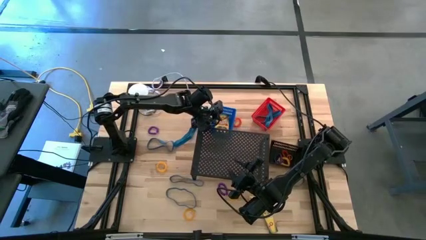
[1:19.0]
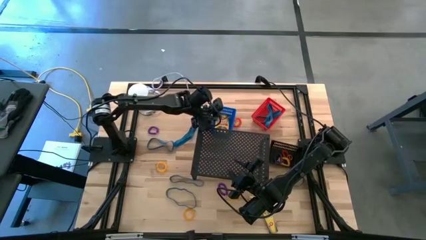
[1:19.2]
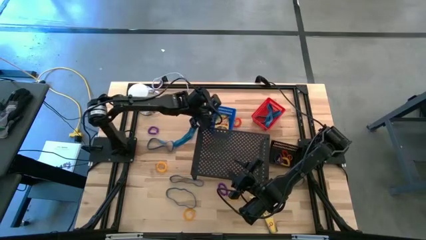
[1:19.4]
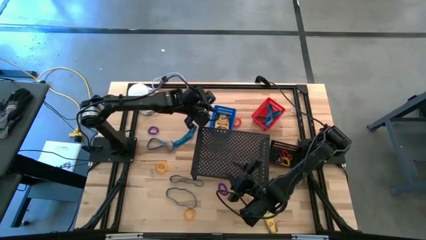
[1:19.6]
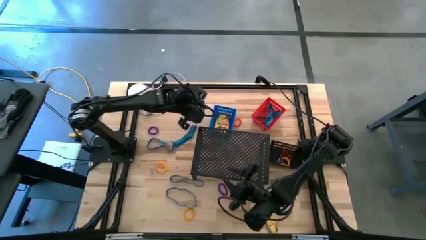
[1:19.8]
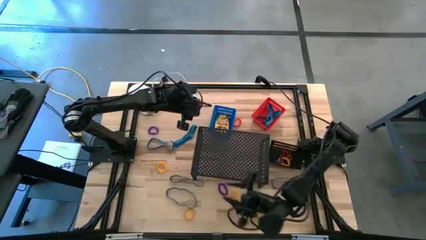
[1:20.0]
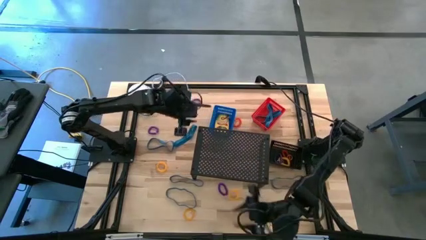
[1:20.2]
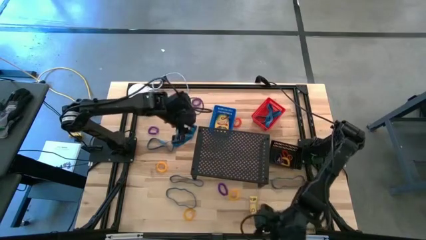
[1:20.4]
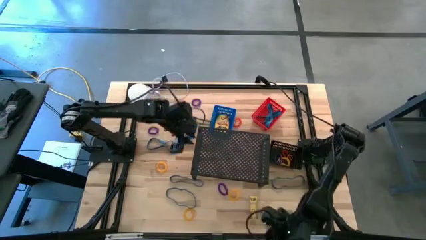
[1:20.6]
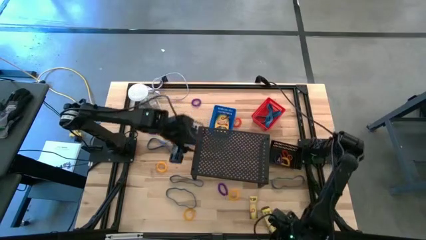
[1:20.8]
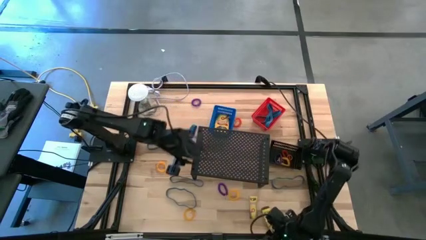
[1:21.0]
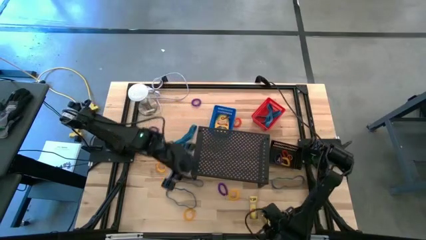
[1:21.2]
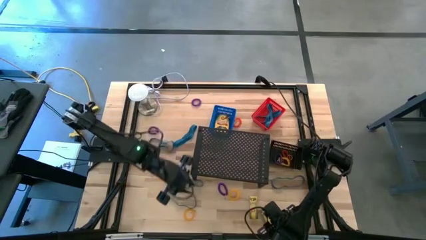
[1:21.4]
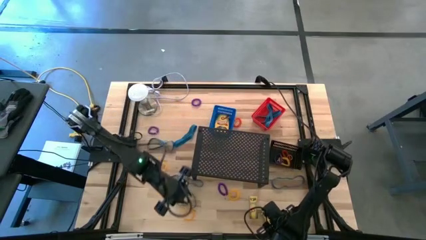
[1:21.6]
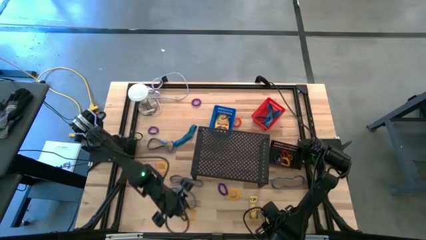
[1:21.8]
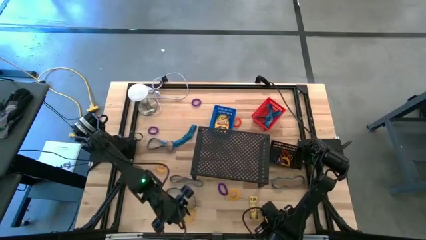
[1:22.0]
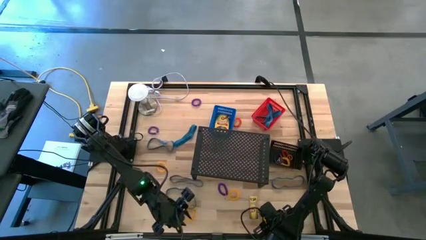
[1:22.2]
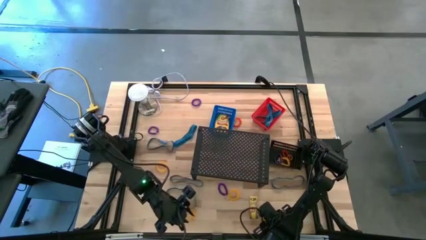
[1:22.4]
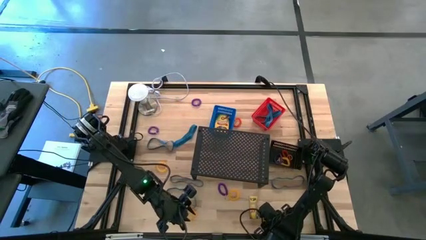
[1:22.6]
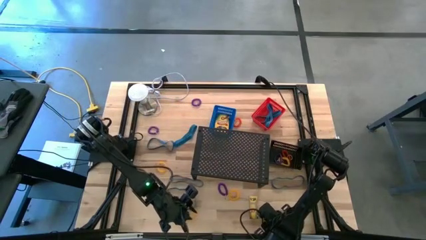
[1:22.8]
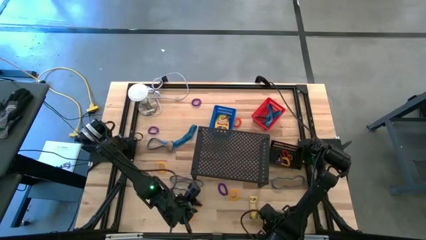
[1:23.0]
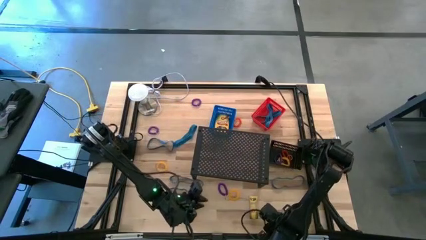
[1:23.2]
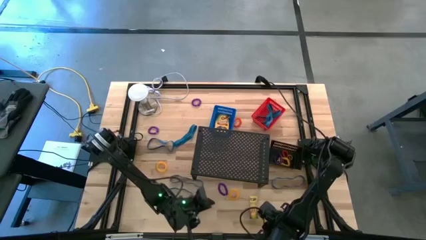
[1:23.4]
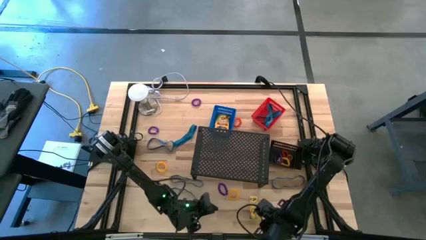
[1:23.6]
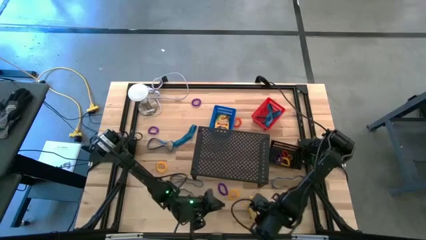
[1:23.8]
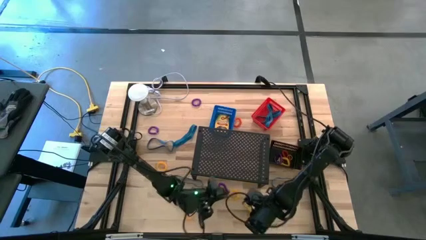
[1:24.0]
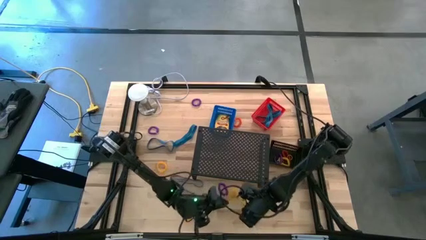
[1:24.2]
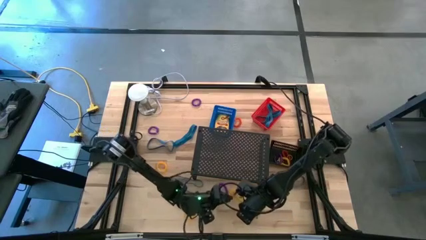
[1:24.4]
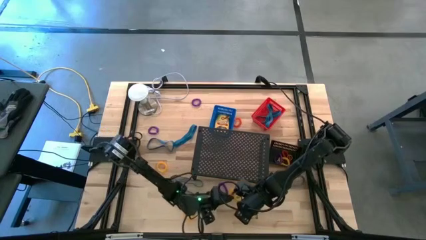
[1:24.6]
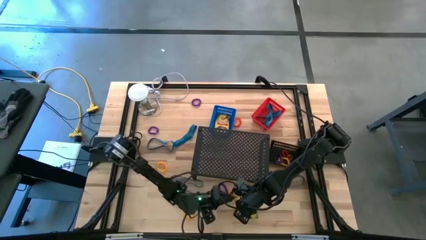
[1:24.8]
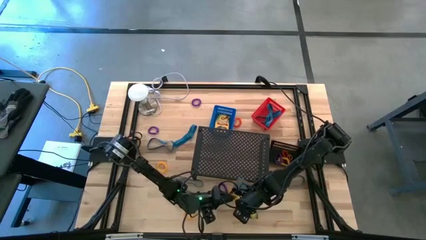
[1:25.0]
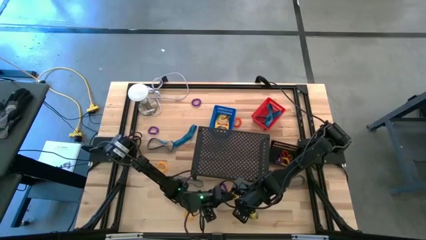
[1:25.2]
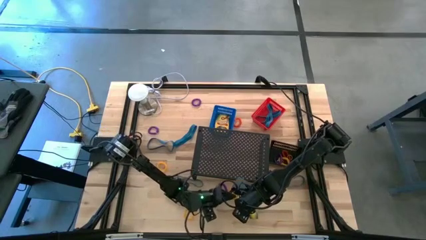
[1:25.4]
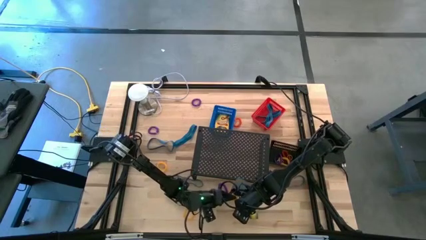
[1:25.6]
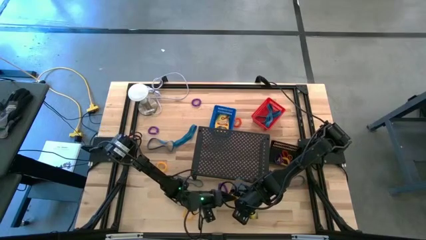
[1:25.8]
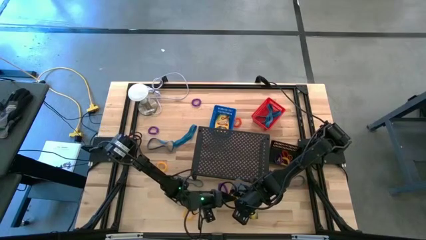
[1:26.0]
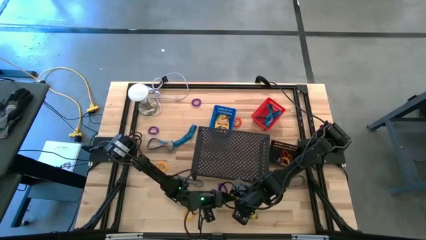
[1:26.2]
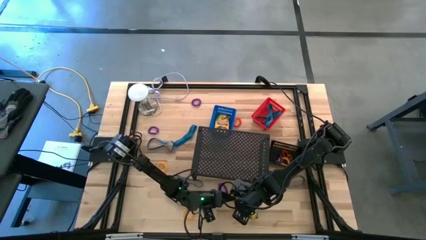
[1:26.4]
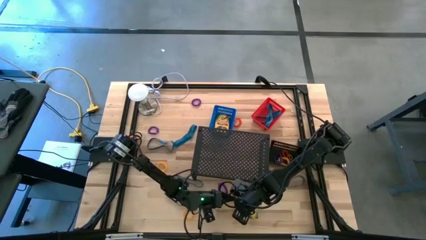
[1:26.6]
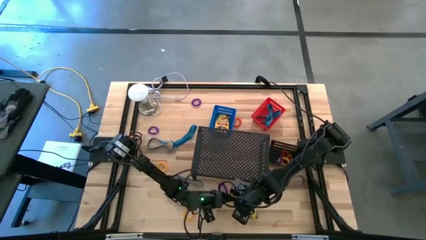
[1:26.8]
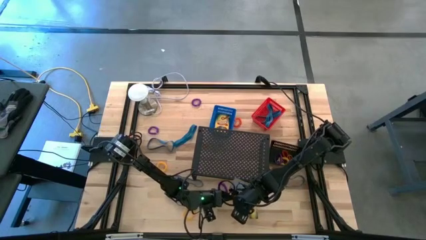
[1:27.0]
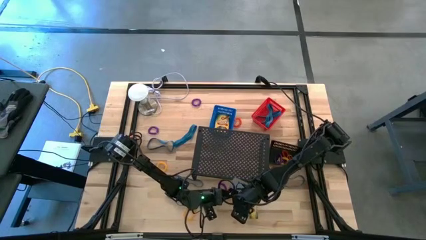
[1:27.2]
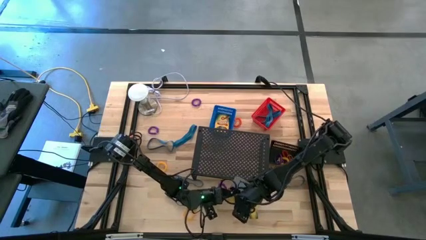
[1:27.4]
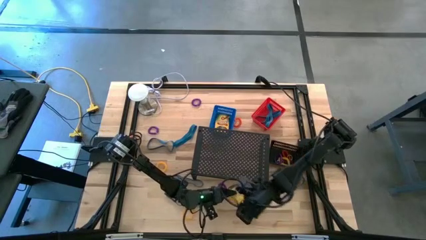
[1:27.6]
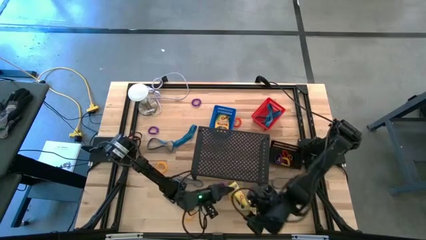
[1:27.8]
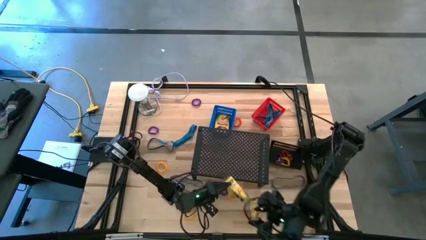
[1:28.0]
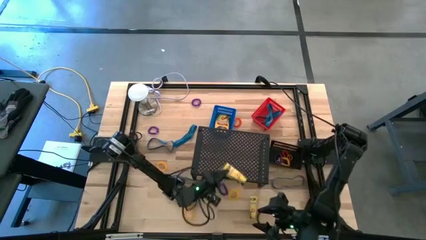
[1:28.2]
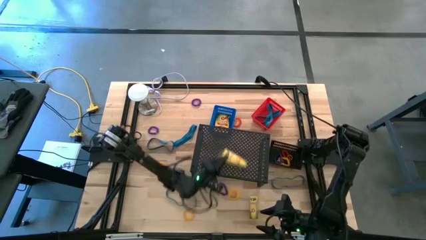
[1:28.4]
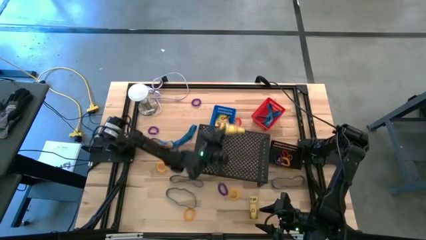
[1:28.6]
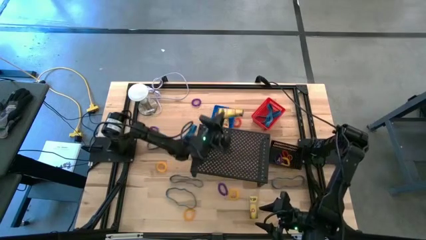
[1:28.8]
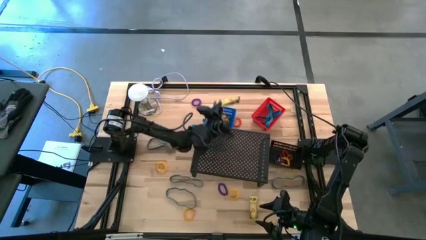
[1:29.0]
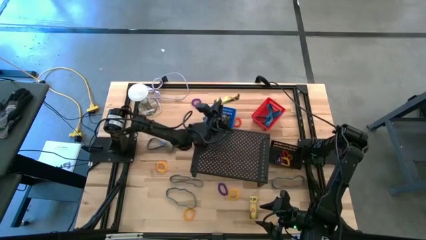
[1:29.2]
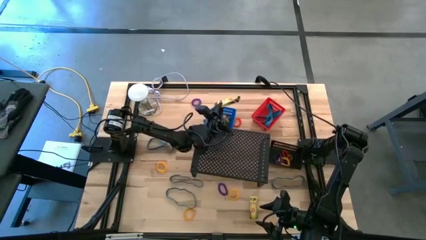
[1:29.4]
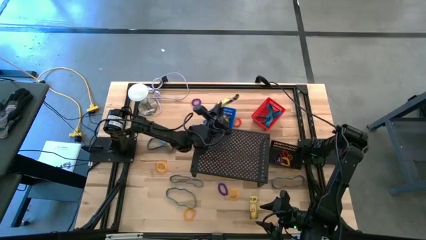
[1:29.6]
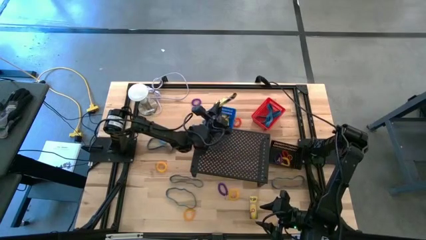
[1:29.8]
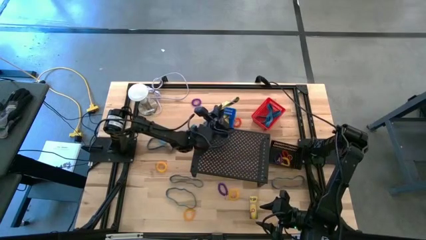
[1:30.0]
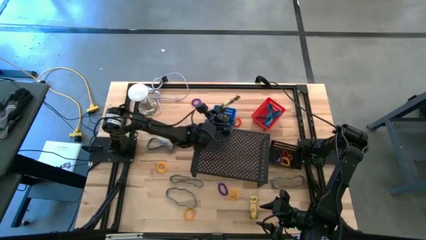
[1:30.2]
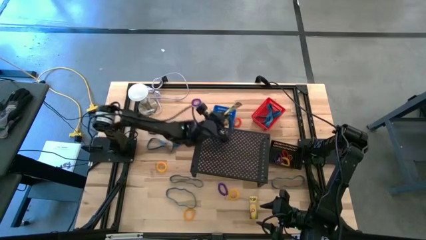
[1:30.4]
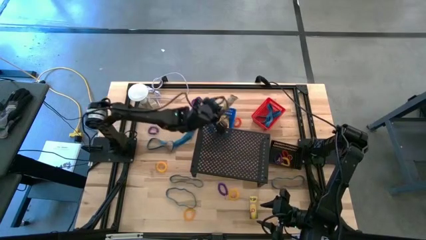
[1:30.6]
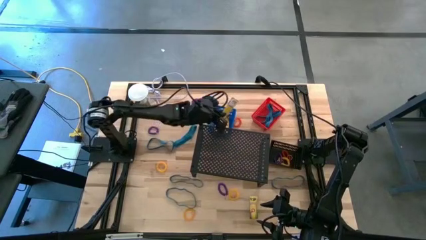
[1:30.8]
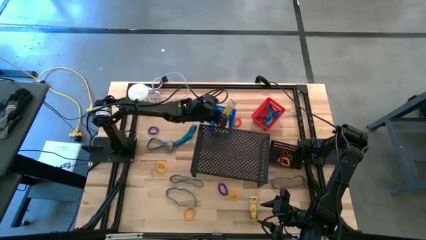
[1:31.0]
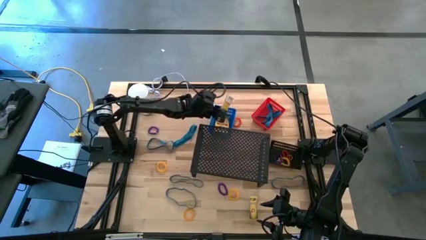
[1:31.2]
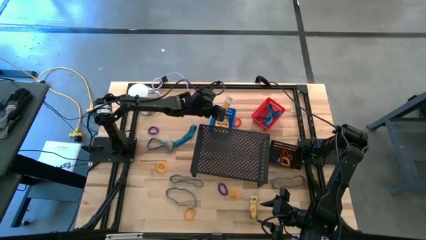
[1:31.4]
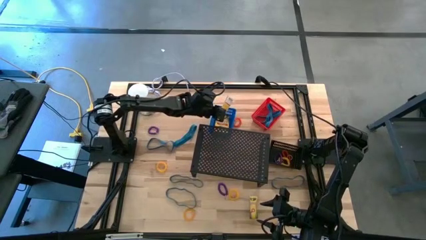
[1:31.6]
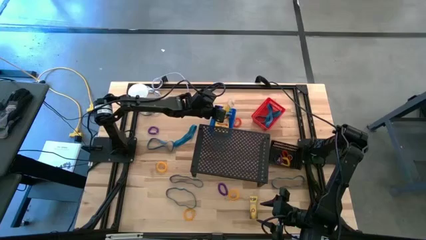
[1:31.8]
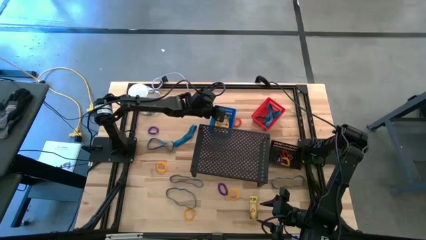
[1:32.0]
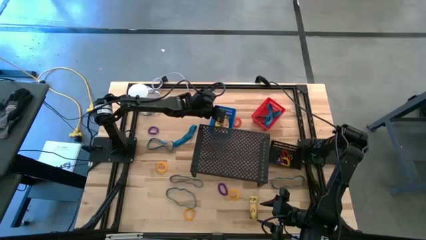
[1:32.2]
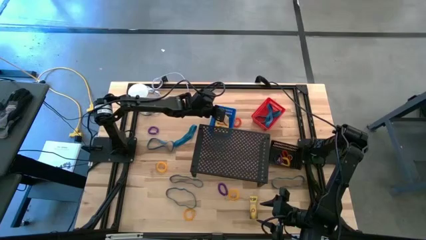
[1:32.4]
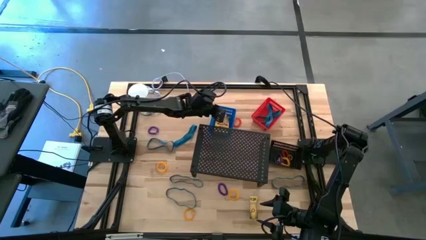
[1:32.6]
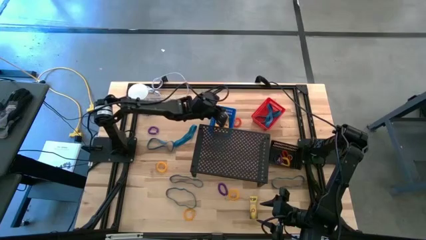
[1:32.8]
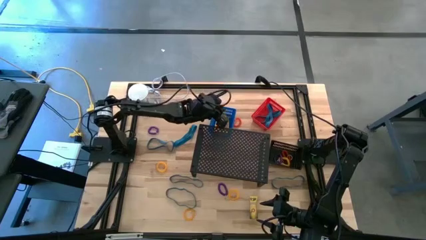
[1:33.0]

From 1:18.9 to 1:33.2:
Task: Pick & Place Office Desk Supplies
Put the yellow crayon box into the blue bin

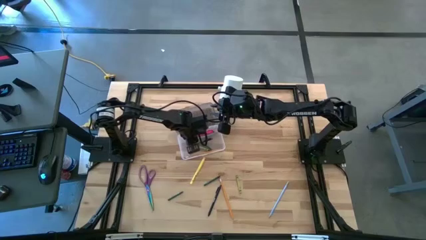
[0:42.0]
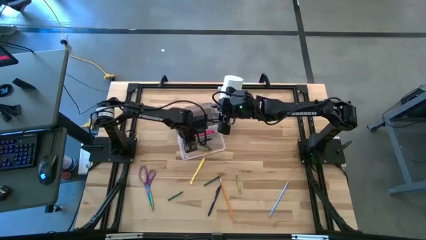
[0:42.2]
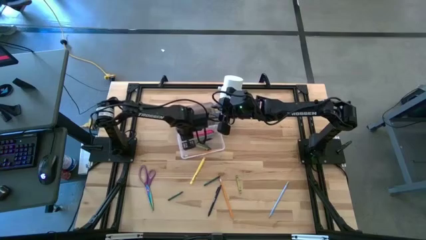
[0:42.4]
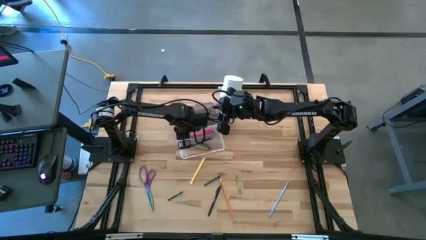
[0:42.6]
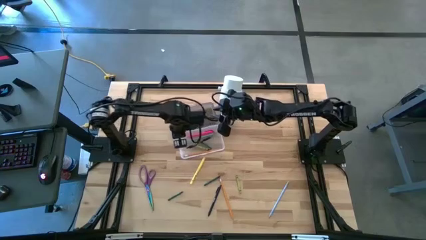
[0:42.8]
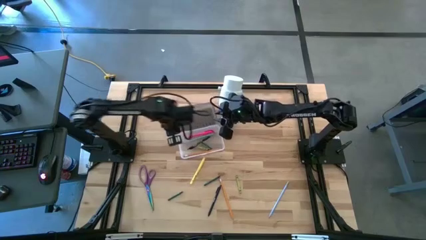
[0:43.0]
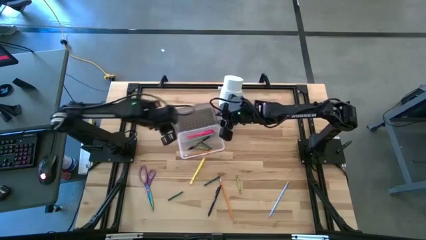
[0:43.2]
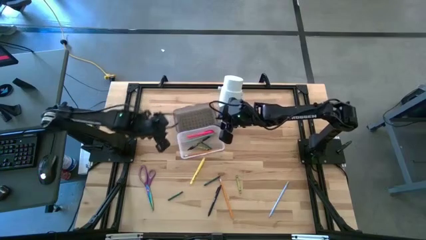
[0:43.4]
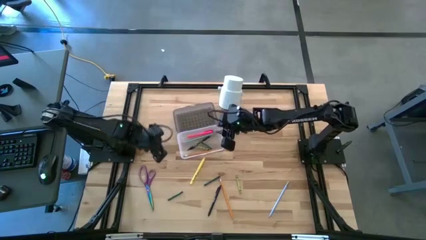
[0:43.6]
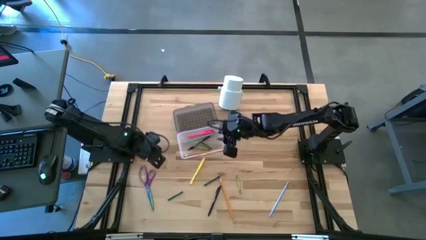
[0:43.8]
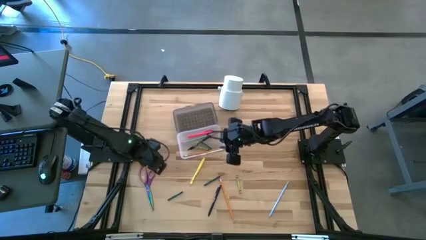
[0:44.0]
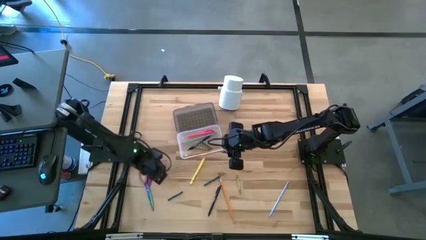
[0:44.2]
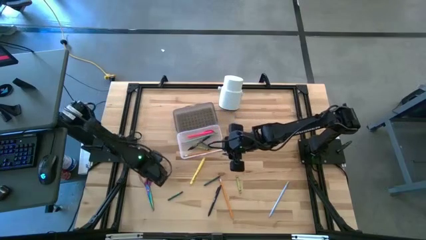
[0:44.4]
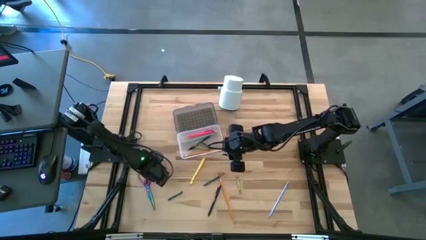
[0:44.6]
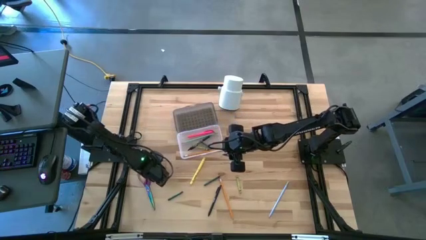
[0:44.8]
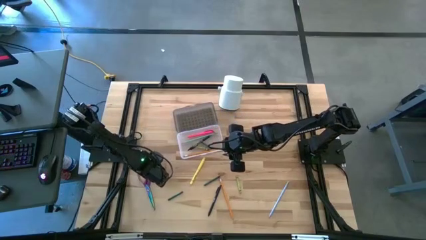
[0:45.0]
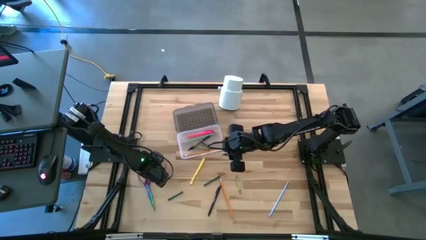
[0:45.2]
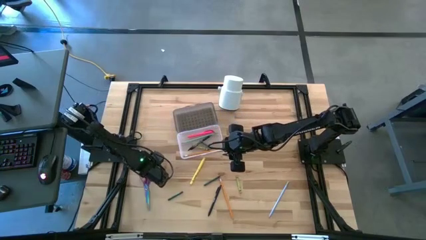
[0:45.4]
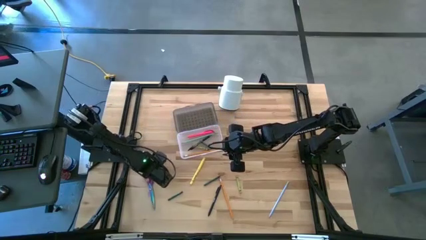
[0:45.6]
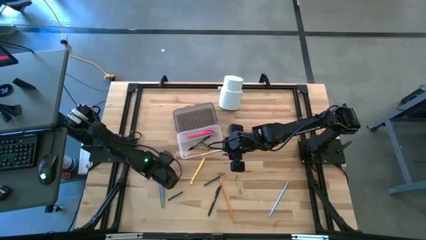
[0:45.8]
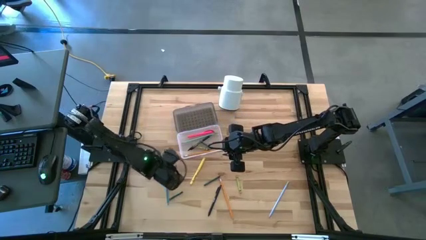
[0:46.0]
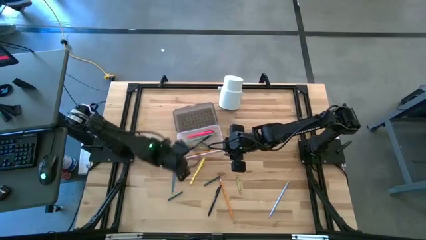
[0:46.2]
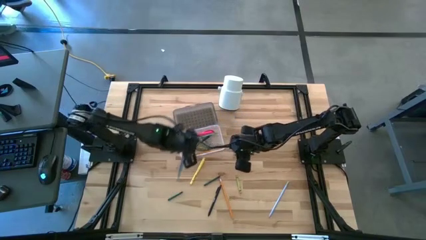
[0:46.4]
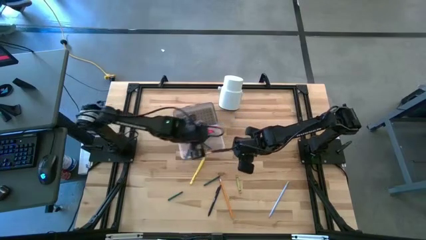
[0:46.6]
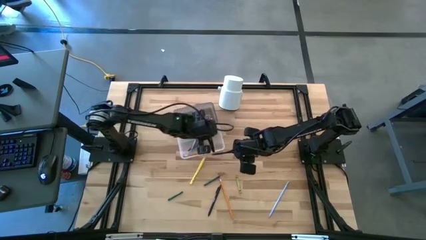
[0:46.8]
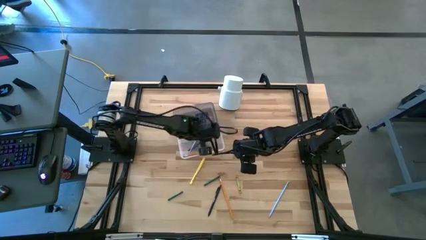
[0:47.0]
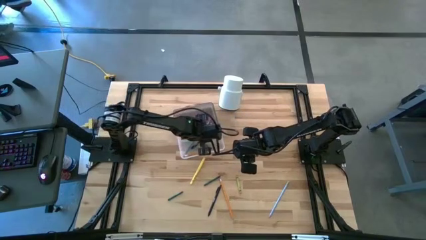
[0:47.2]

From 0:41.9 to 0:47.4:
Task: Pick & place school supplies into a supply box
Put the violet scissors into the black supply box
